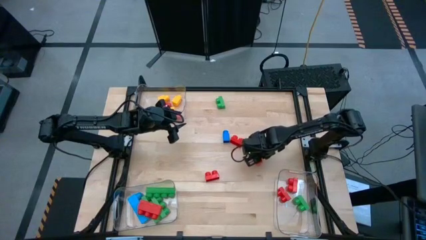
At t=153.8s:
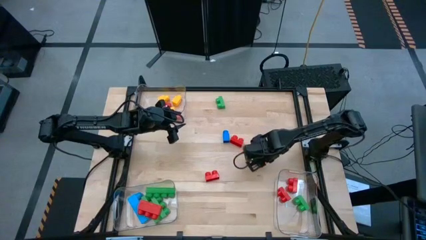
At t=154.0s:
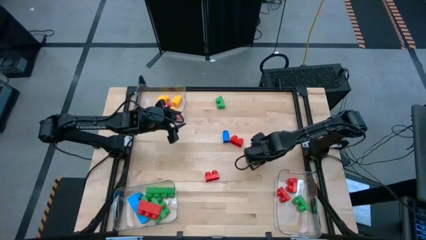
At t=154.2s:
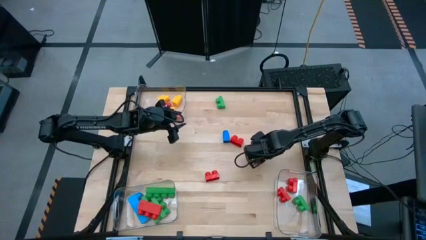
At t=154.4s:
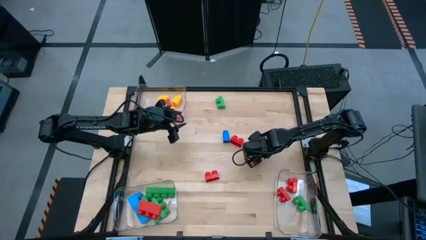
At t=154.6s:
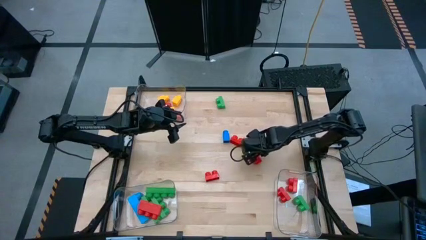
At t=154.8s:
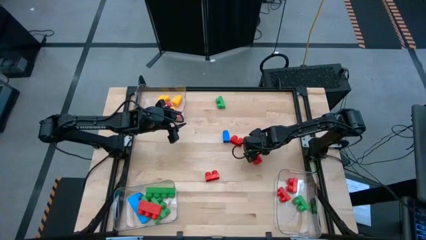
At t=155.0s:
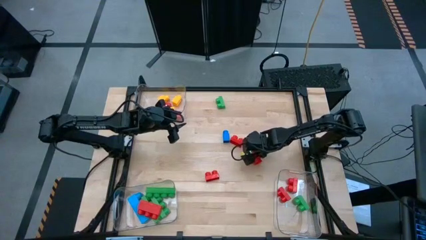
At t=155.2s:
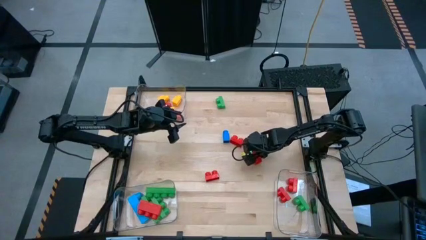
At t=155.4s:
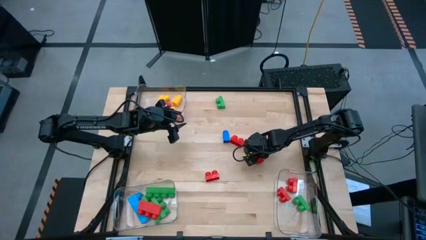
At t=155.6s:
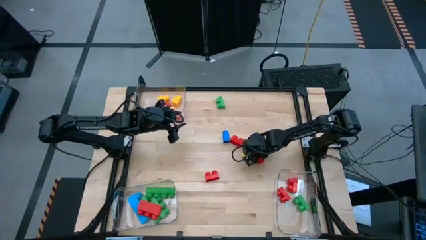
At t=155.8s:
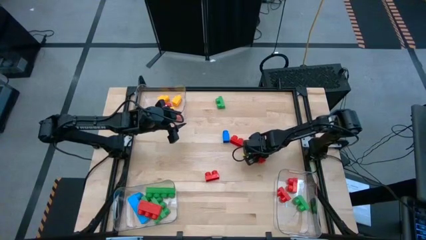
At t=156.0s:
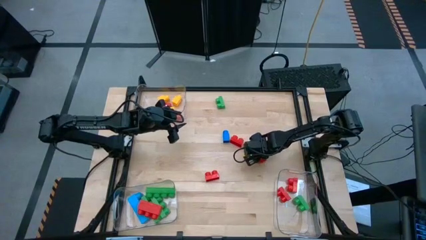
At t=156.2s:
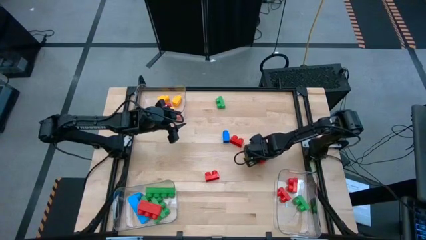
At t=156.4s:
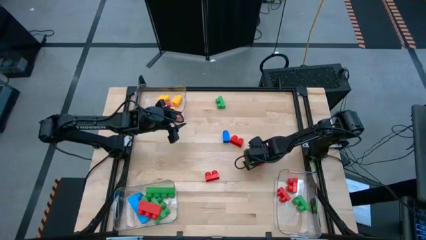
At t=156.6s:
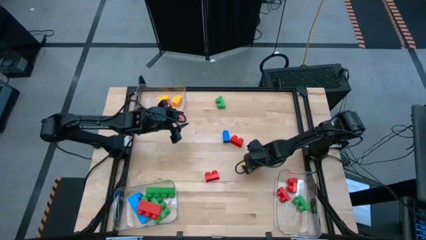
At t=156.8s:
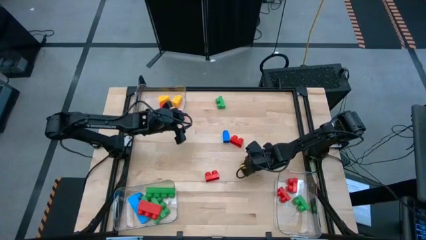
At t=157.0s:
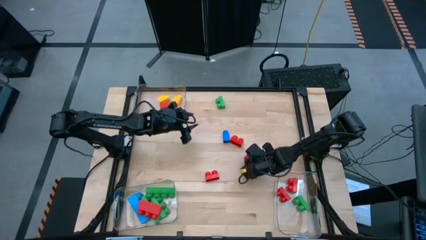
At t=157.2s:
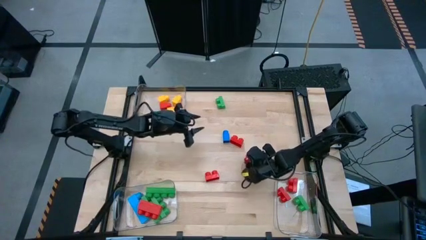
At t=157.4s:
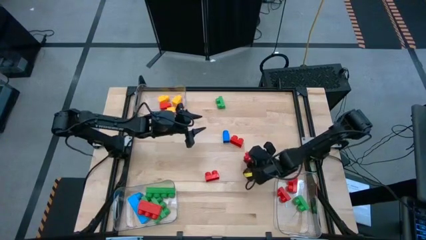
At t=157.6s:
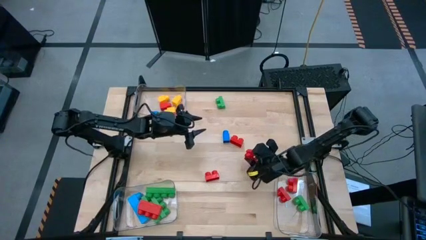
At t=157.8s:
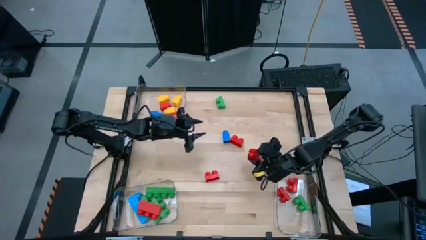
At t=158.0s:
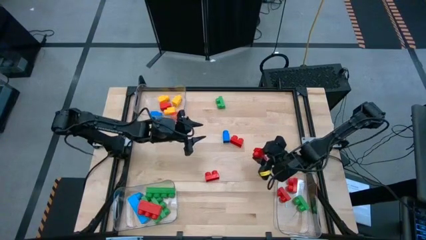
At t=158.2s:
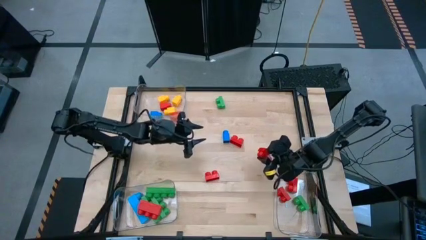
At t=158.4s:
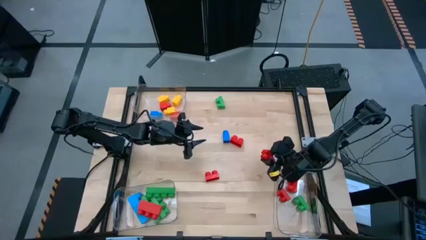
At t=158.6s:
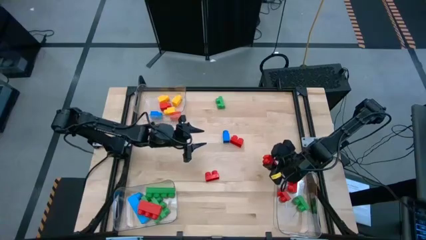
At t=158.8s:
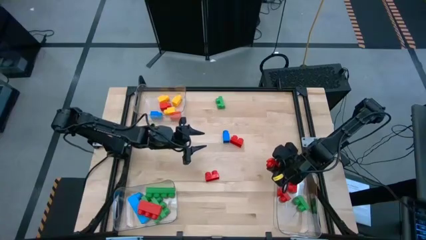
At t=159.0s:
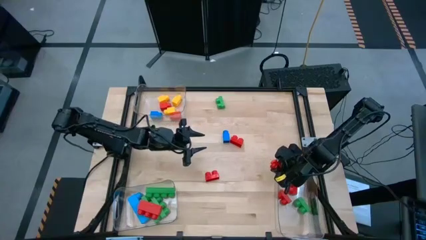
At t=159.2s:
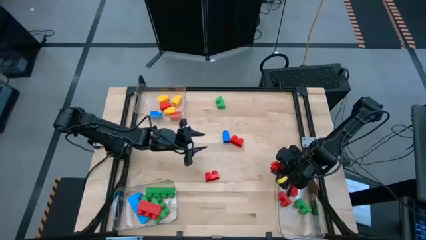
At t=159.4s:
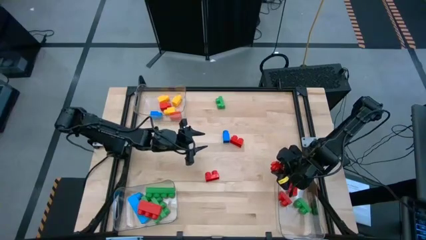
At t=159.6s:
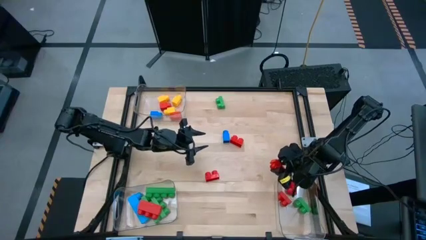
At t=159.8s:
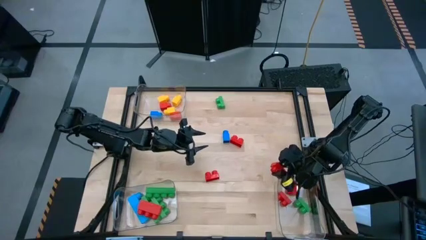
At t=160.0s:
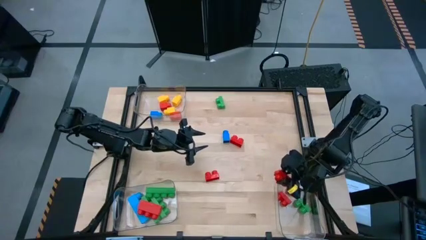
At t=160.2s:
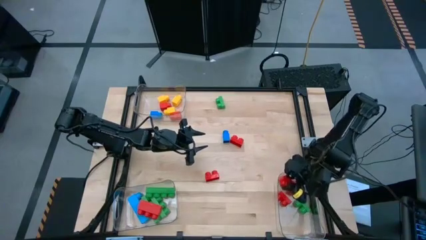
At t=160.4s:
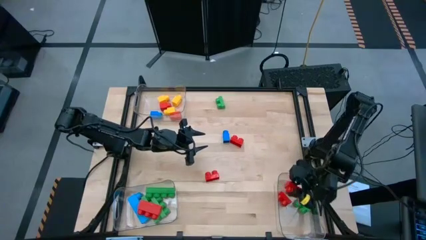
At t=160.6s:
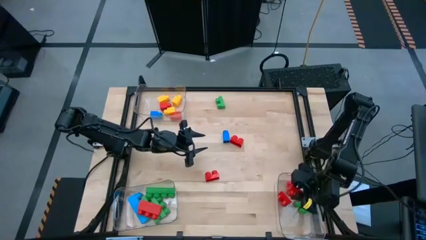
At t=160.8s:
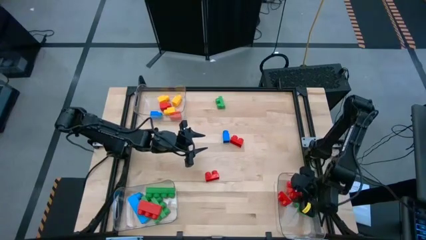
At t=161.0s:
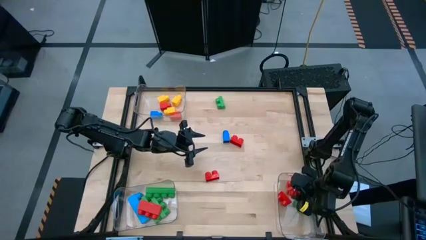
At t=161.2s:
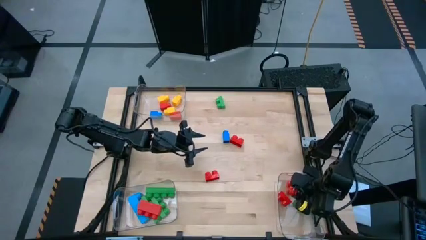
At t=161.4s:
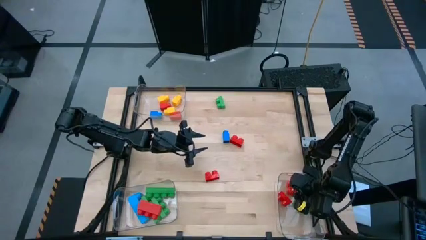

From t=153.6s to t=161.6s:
Task: Sort blocks by size
Put the middle right red game piece into the bottom right transparent bin

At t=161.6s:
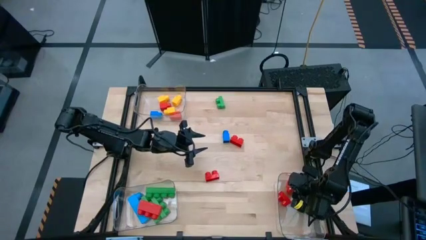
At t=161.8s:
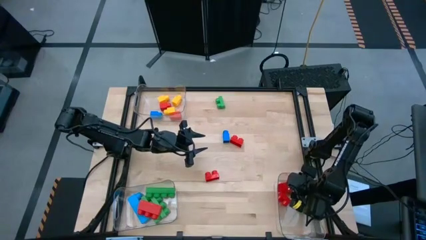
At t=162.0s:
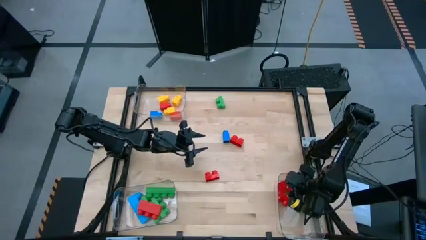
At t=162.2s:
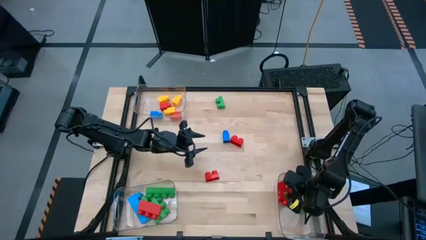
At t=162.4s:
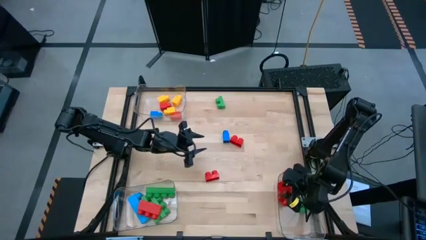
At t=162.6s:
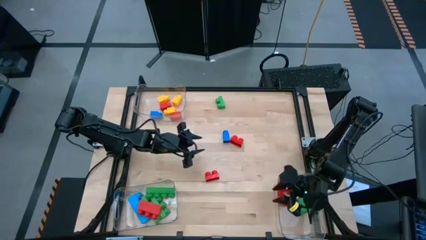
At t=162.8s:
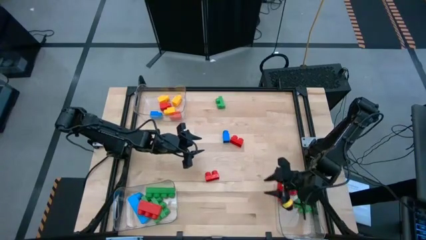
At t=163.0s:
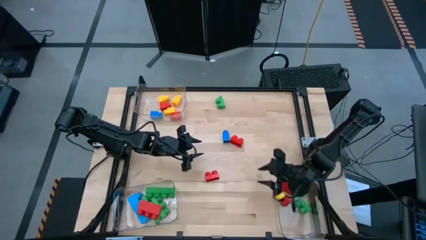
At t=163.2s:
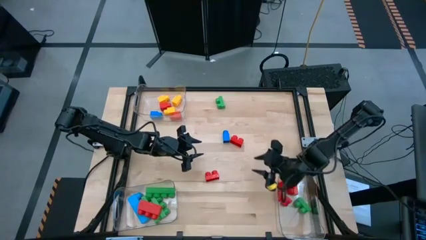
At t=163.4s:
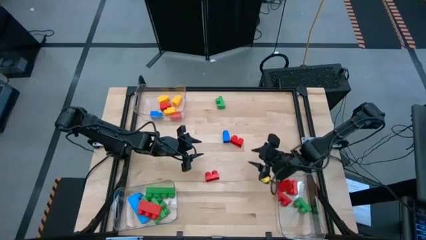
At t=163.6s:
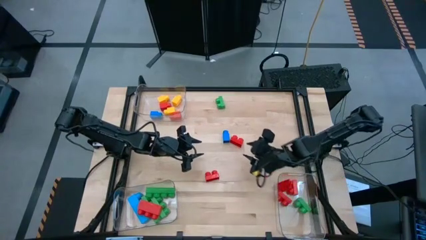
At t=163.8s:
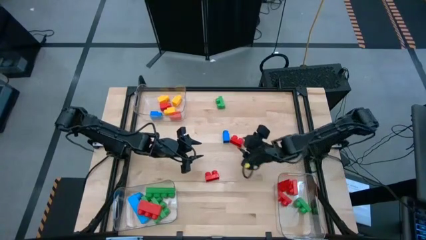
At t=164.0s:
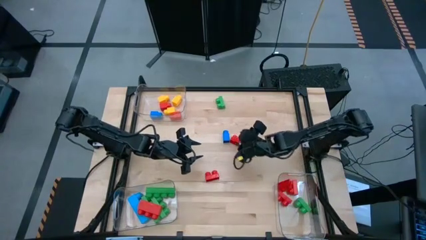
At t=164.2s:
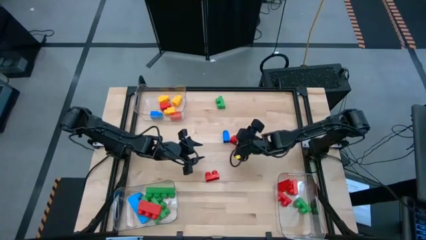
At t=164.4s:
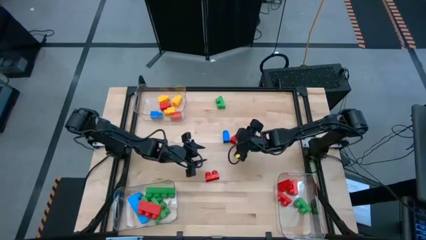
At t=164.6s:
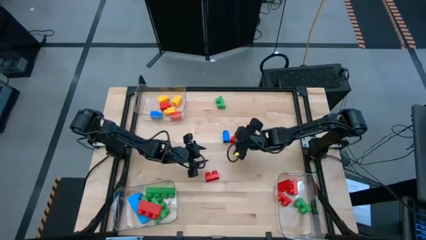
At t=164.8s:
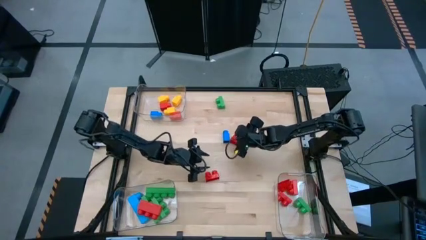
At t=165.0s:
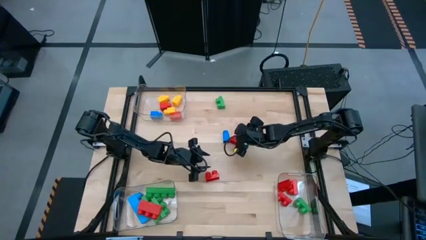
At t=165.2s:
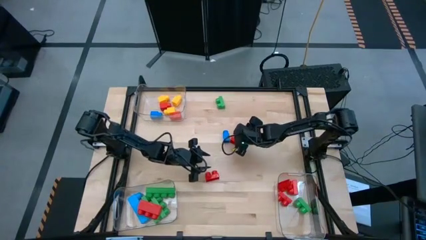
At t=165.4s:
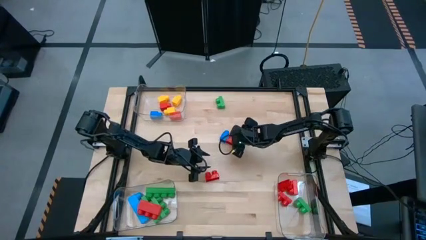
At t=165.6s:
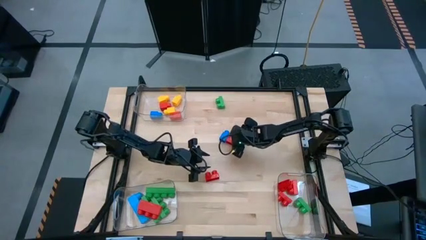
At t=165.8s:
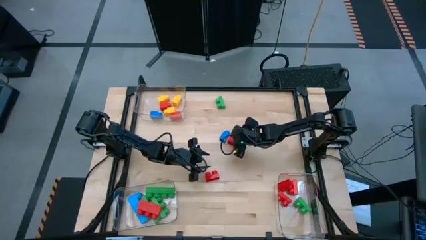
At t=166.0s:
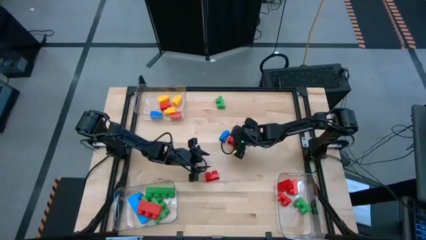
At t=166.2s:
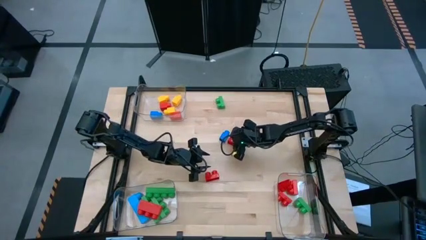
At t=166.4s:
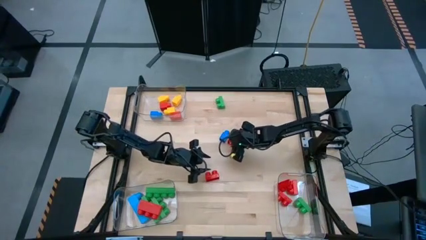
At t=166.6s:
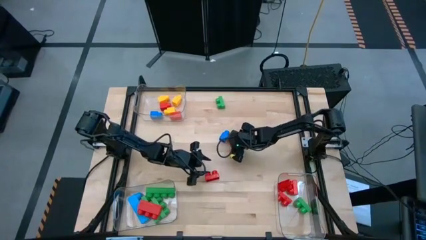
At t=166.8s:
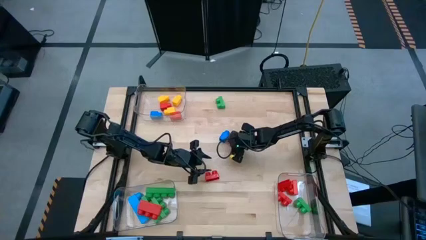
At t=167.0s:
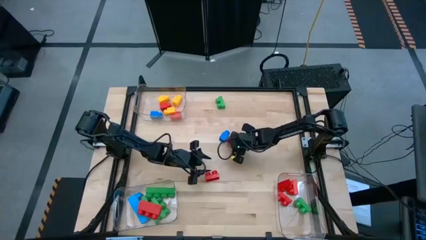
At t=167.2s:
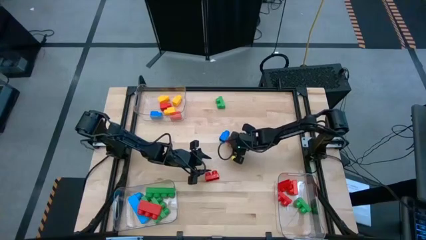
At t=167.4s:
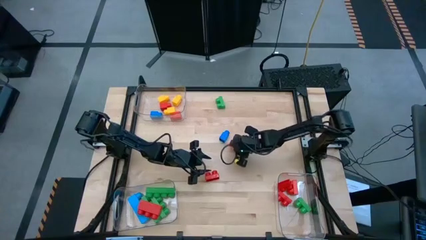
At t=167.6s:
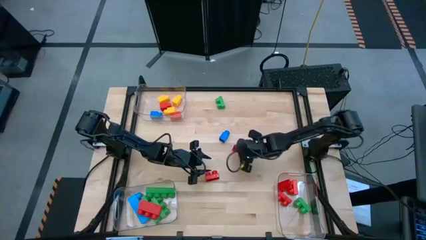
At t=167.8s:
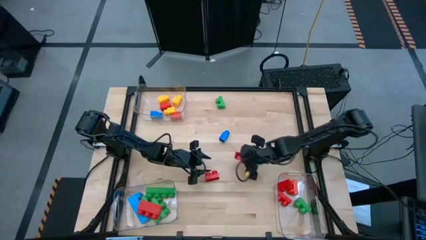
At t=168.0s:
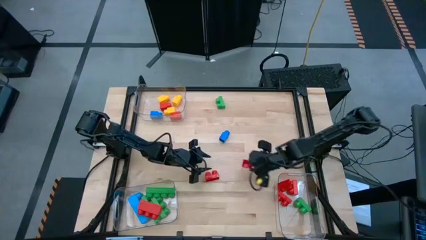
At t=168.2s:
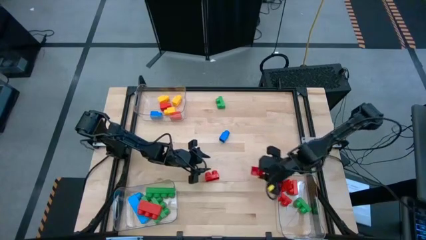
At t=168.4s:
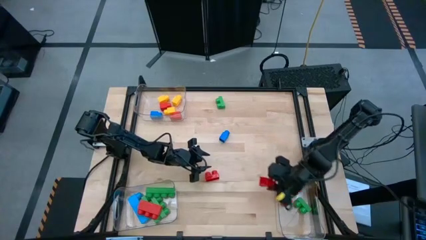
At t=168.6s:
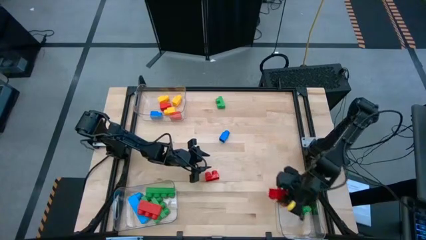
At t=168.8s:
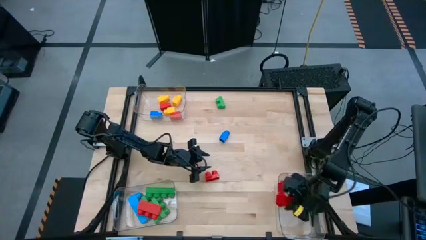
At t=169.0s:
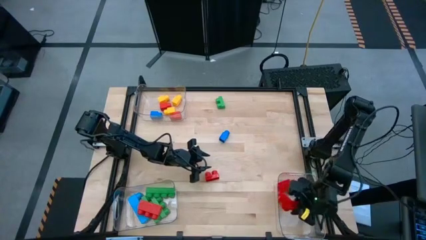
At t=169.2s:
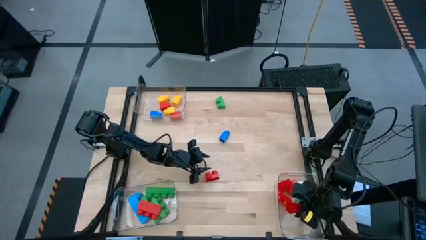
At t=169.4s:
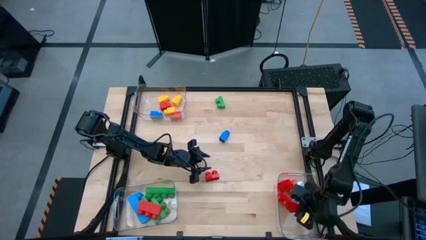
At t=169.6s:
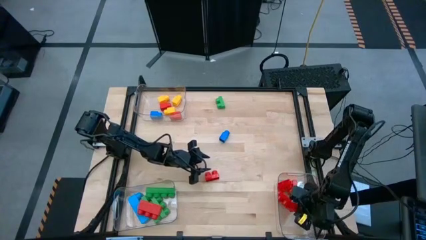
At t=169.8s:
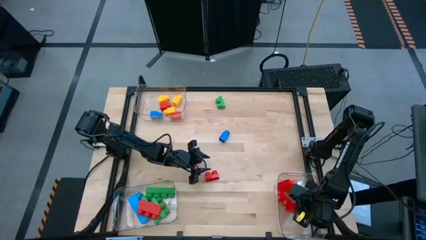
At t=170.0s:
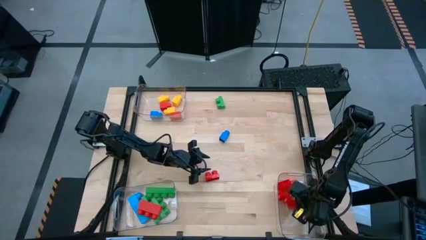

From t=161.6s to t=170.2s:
Put the two-stud red game piece into the bottom right transparent bin

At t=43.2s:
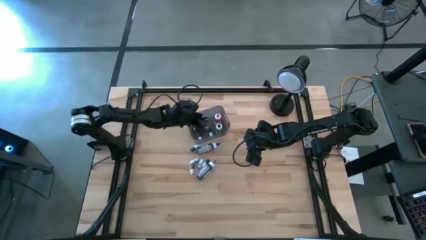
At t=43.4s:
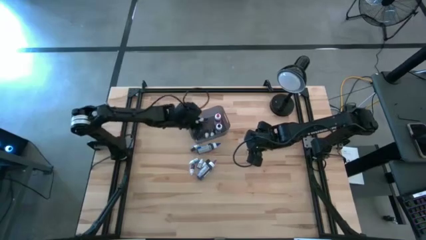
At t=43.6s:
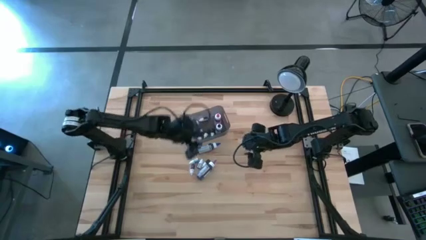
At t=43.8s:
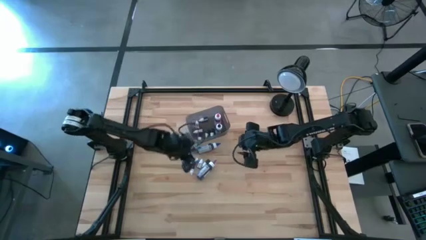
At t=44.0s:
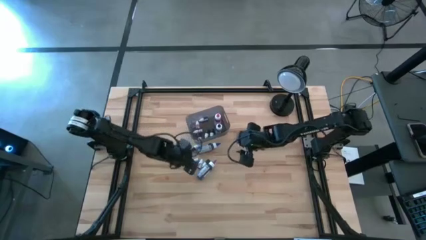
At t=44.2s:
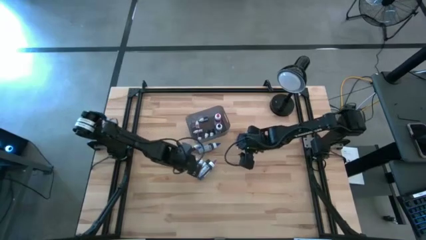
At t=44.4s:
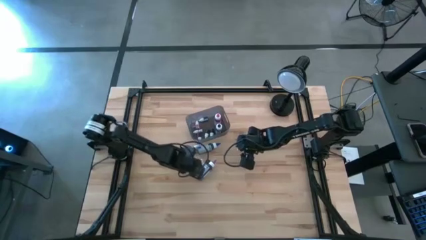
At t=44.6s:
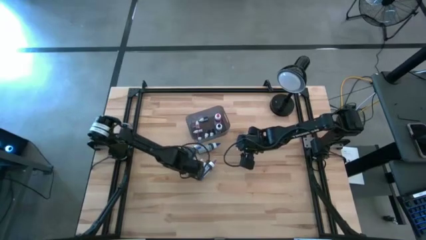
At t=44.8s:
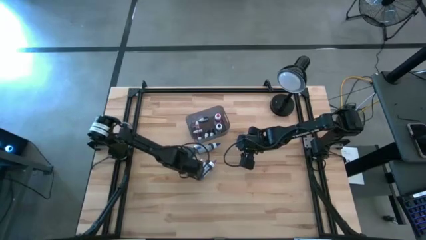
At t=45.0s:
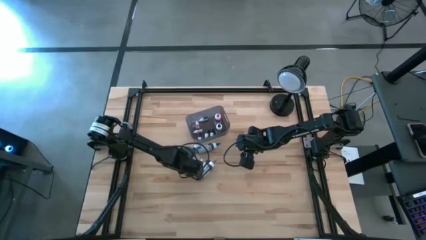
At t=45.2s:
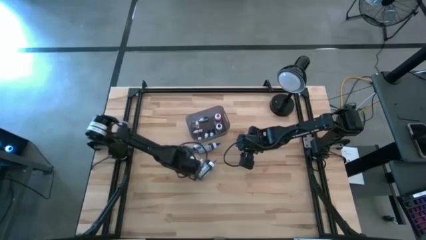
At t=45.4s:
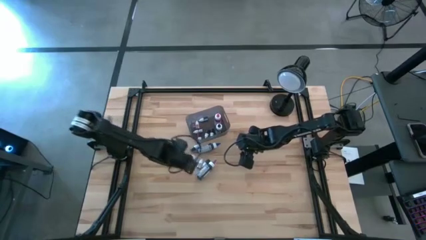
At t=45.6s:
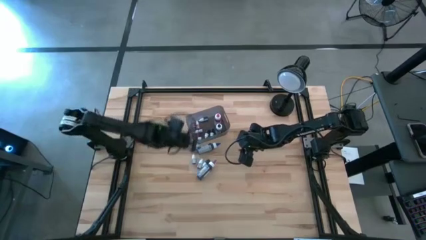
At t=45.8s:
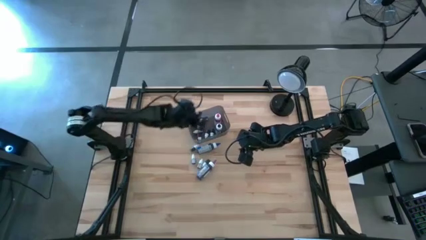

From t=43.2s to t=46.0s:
Task: Pick & Place food coloring
Put the small purple food coloring bottle into the gray bin
